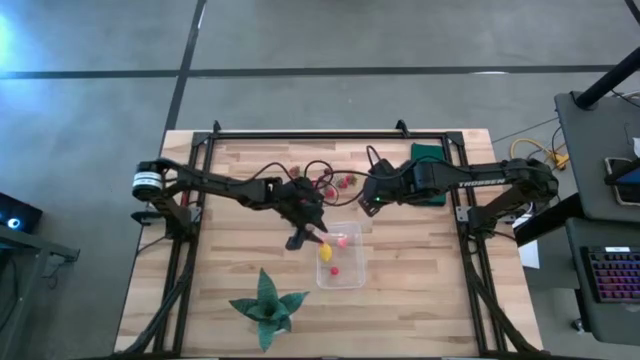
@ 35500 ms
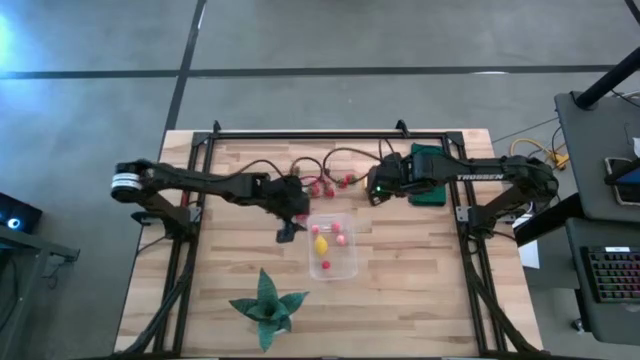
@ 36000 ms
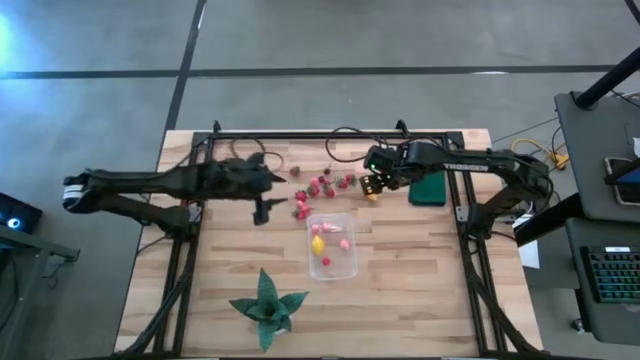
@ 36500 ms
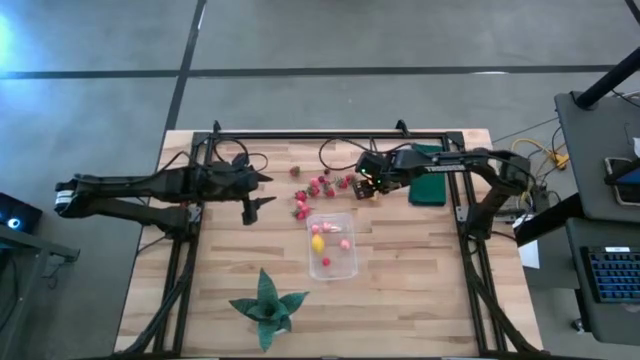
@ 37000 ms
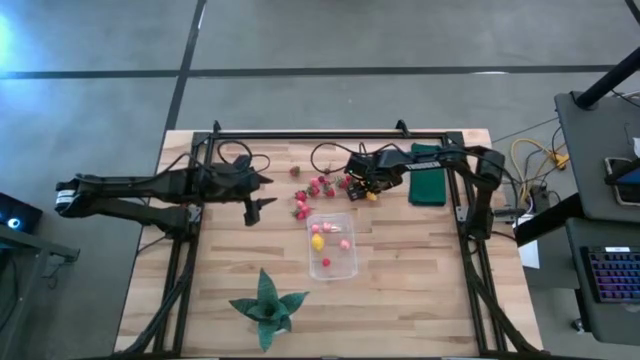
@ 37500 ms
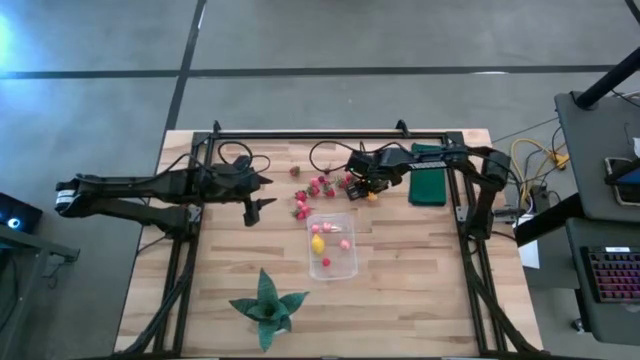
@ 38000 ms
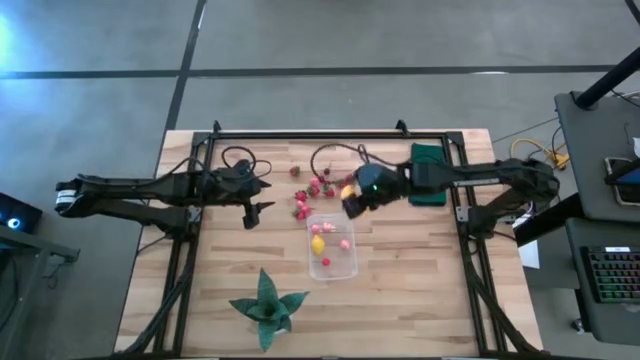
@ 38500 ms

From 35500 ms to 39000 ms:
Task: Pick and placing Produce into tupperware
Put the banana into the transparent bin

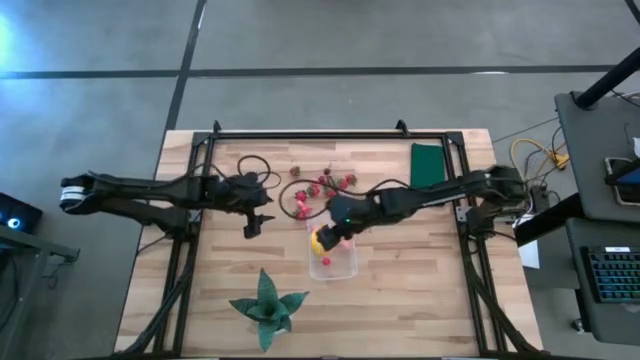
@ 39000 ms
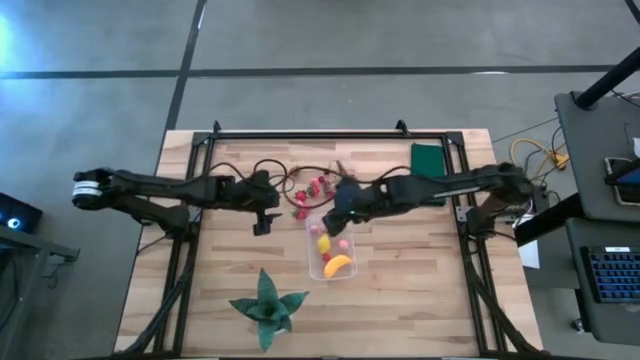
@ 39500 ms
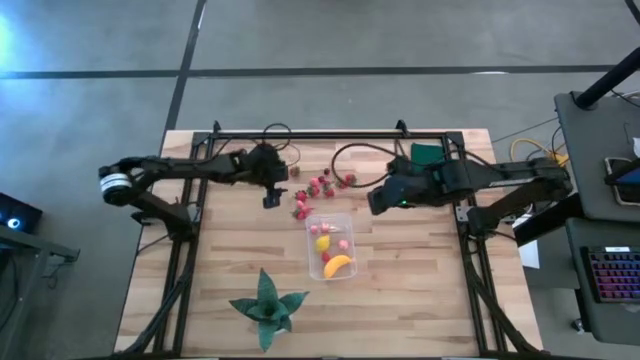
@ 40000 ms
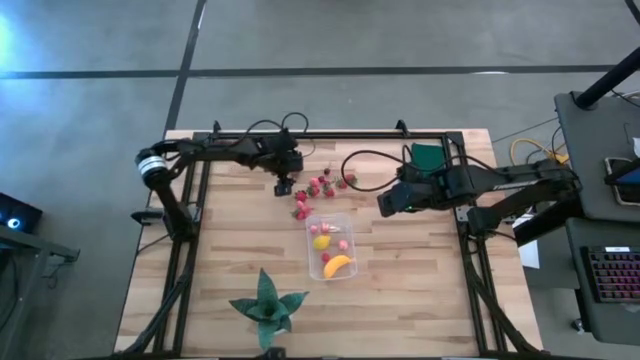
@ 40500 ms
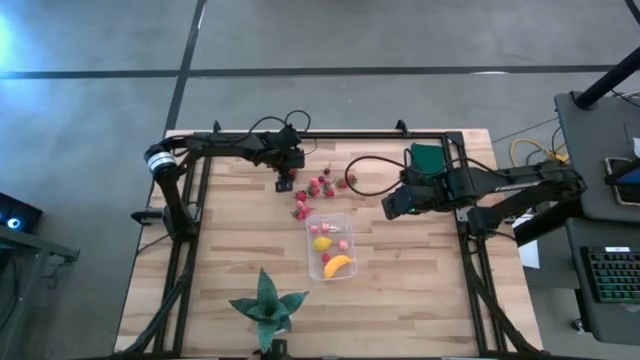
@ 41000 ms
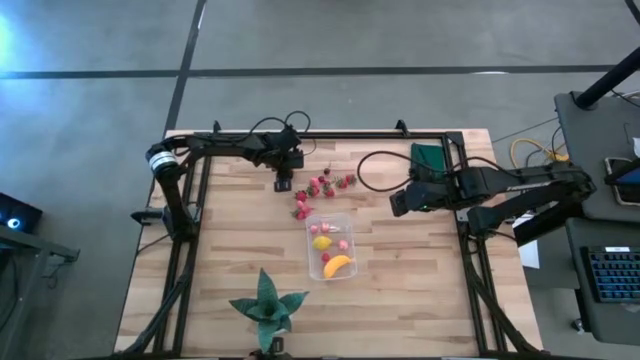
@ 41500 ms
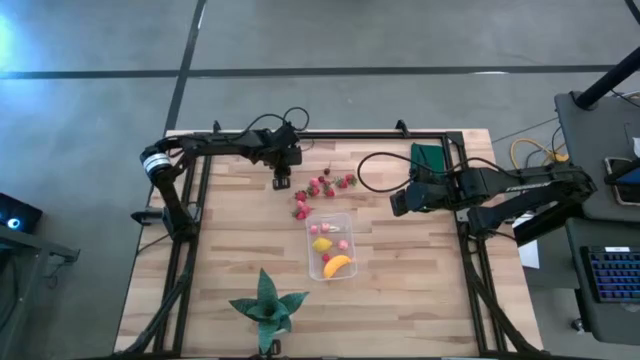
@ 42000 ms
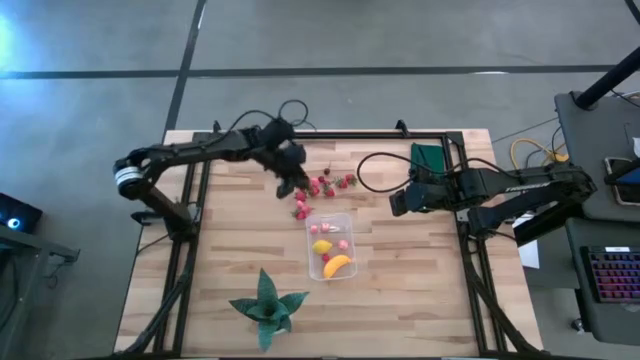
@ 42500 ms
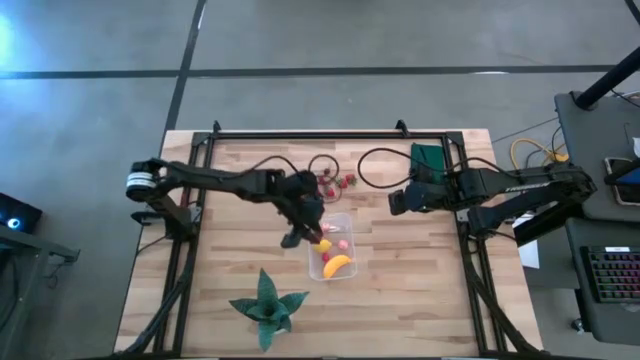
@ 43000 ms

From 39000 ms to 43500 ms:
Put the strawberry into the transparent bin

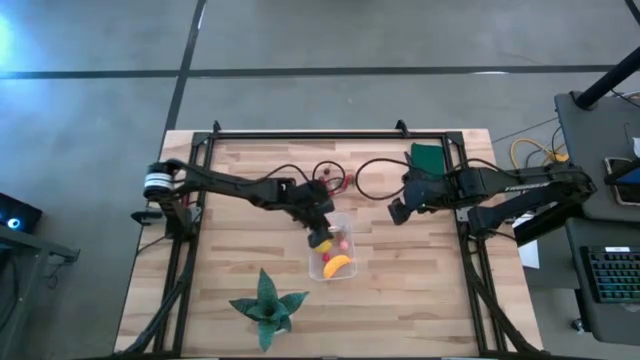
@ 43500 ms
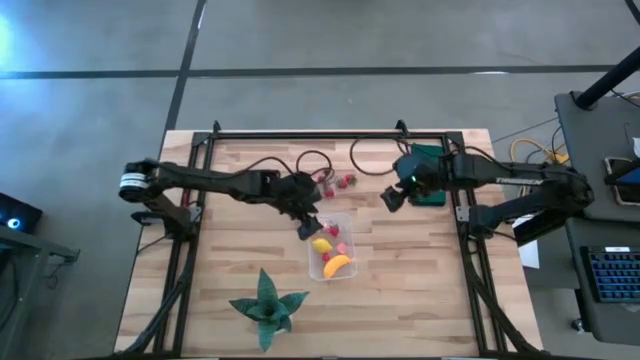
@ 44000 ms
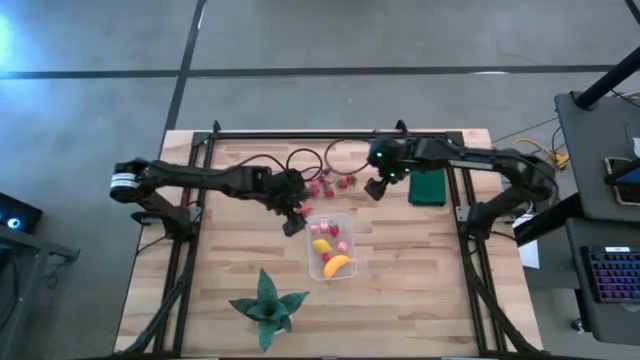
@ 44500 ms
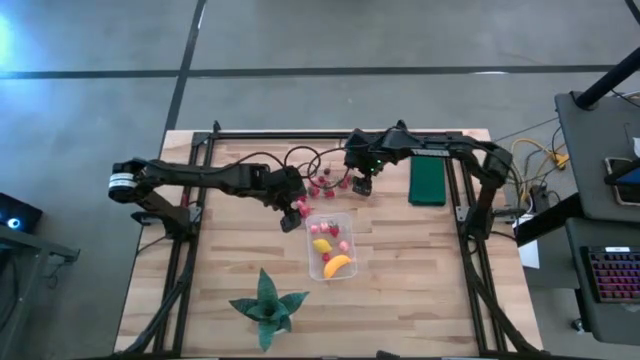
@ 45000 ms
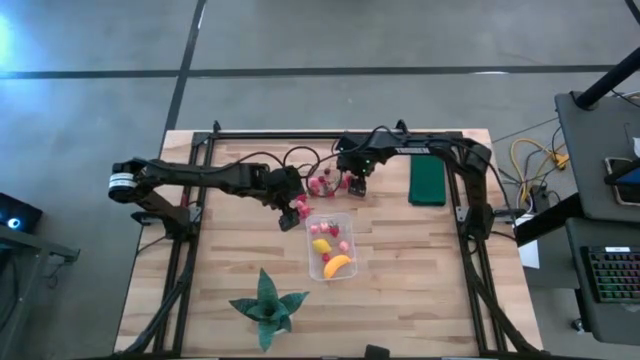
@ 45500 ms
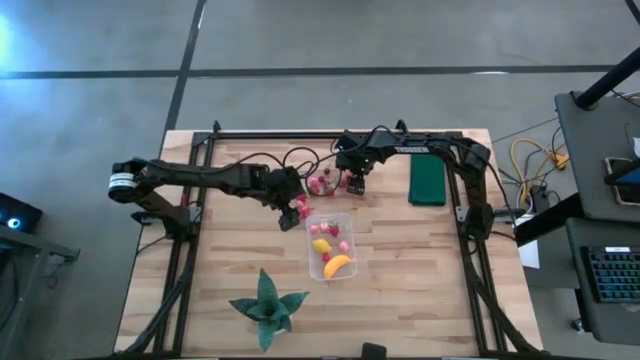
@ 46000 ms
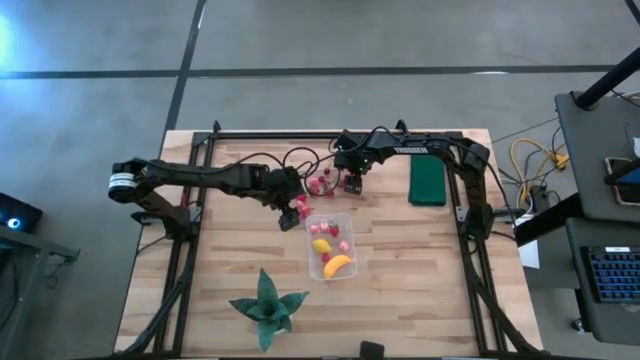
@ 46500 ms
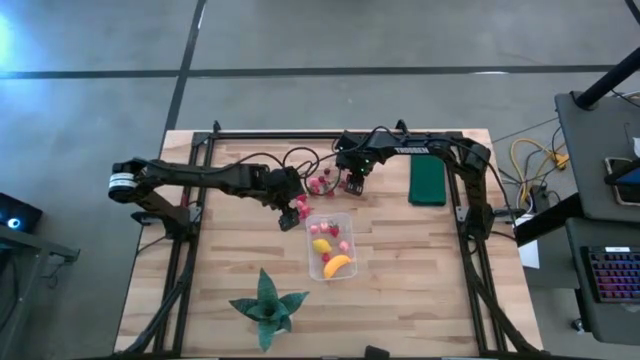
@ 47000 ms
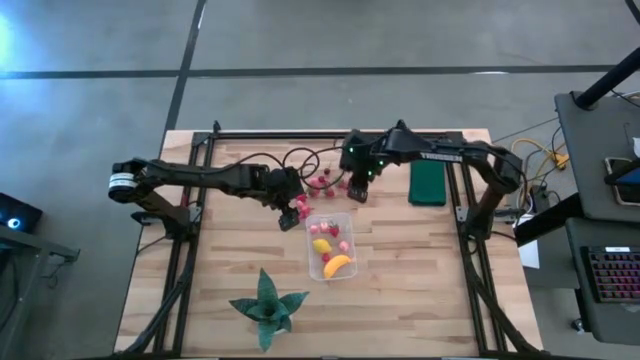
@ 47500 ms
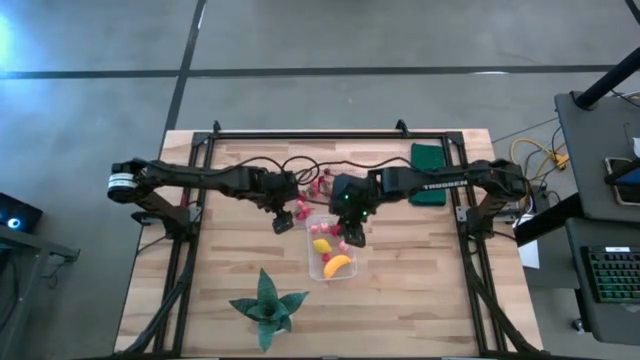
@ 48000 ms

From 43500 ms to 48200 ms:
Put the strawberry into the transparent bin

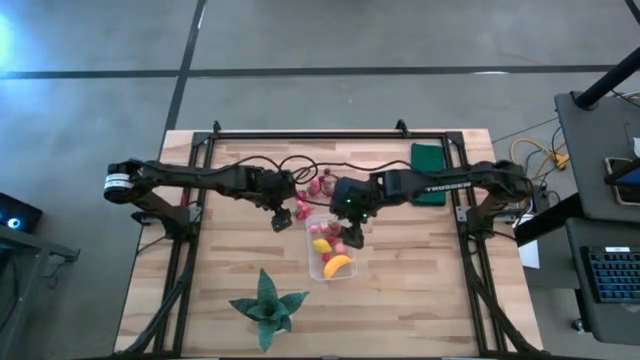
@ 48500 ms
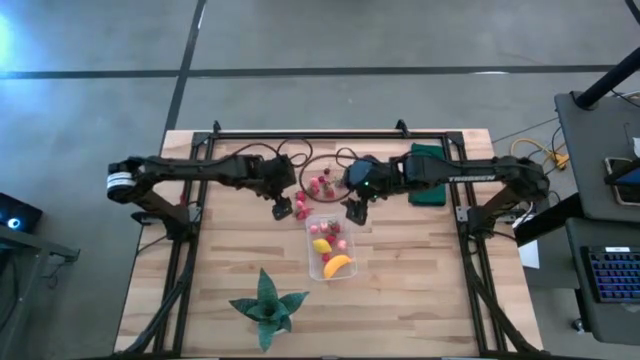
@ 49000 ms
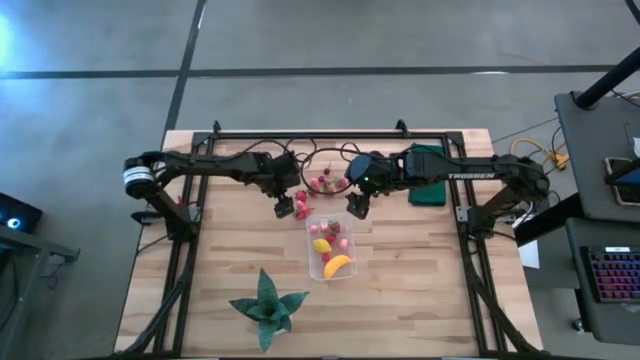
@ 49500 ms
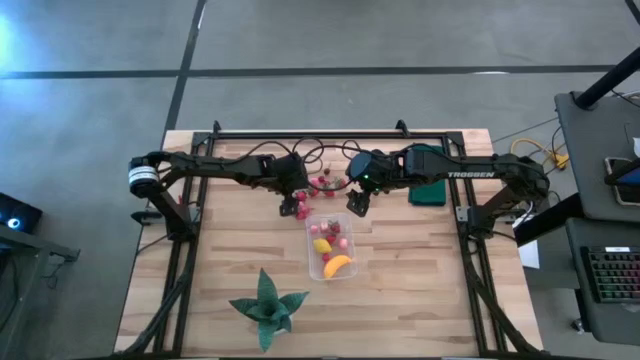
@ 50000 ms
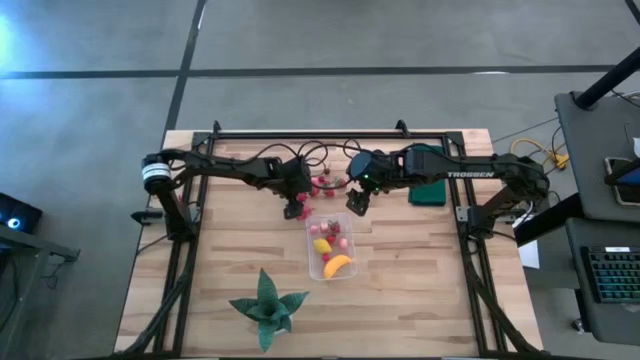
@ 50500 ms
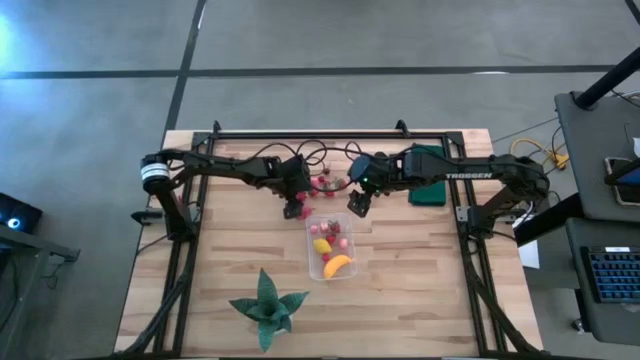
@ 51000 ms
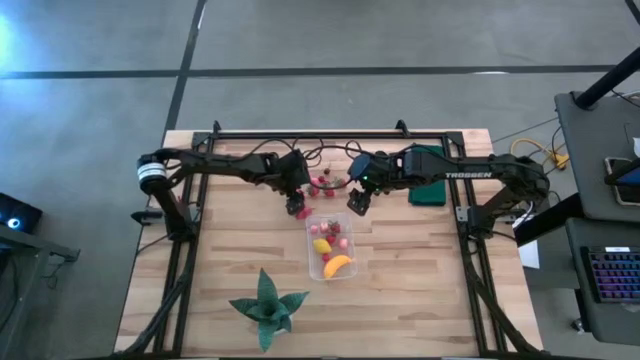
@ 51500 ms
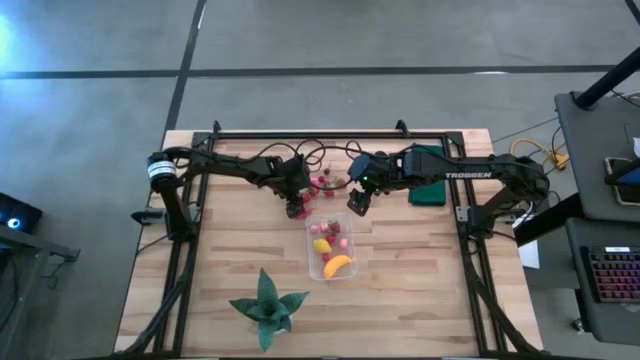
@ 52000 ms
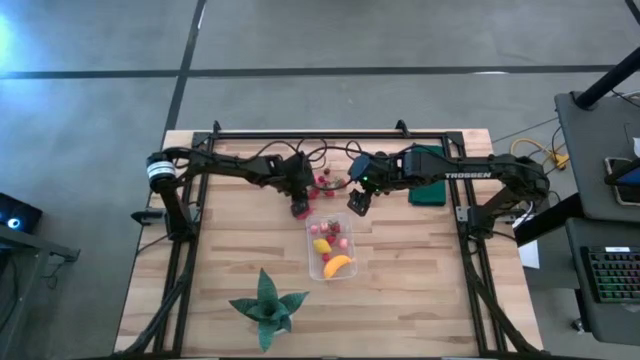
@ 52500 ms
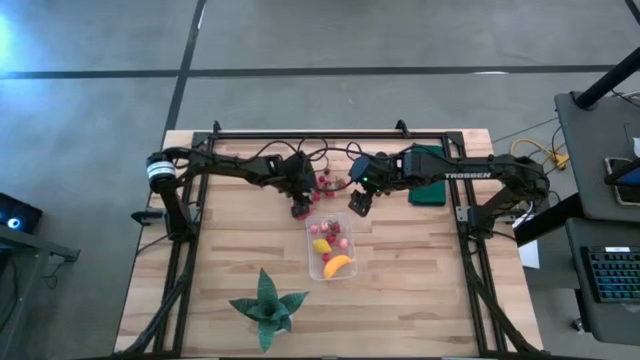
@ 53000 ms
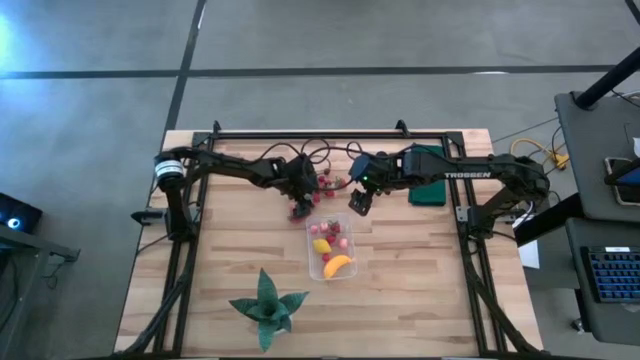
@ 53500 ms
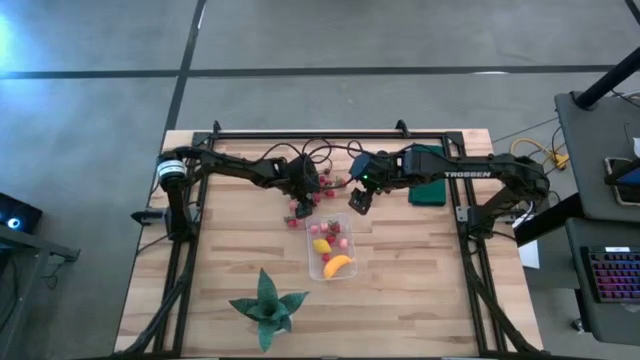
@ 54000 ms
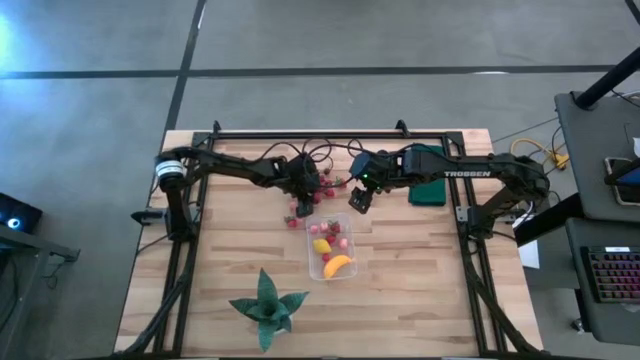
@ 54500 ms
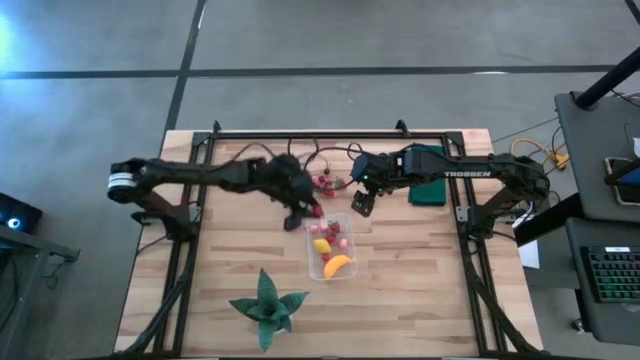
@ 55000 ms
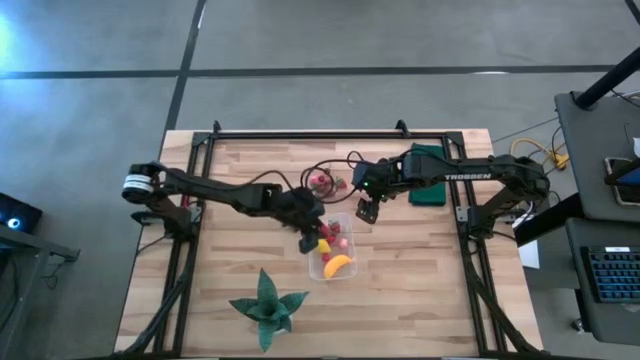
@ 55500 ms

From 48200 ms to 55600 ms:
Put the strawberry into the transparent bin
